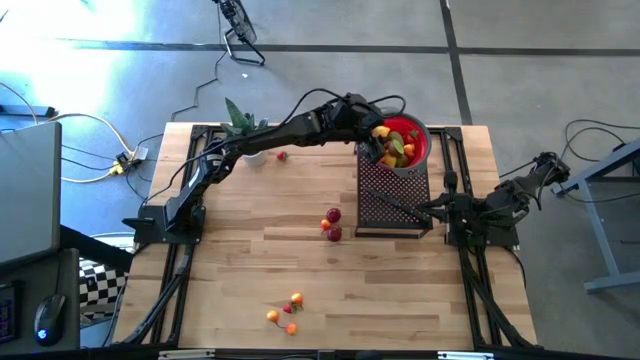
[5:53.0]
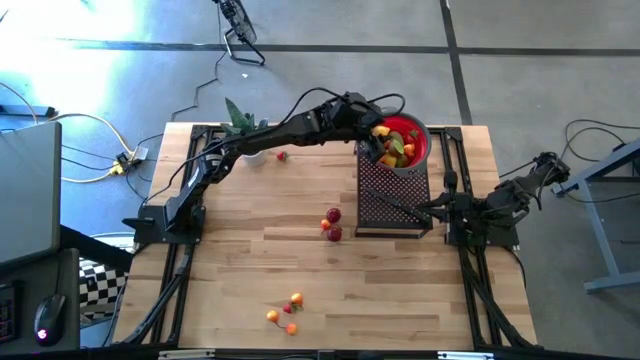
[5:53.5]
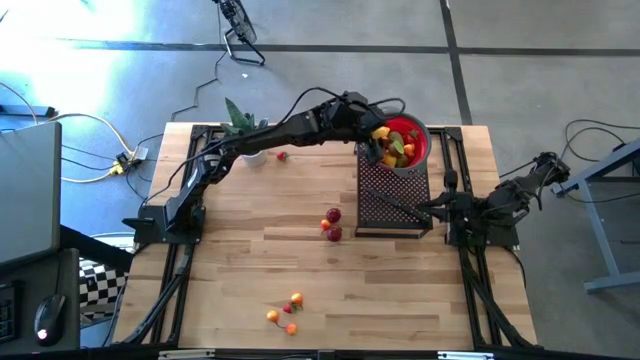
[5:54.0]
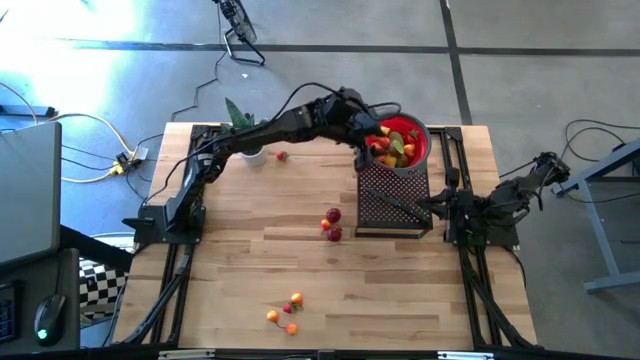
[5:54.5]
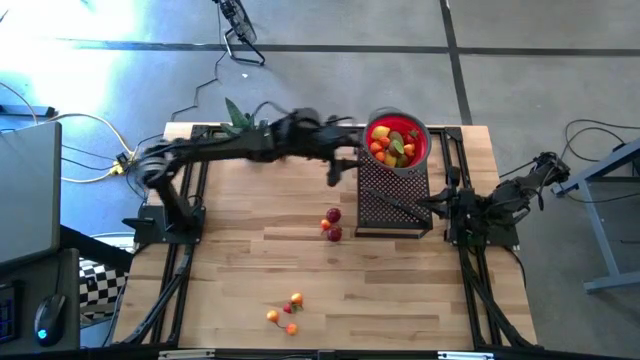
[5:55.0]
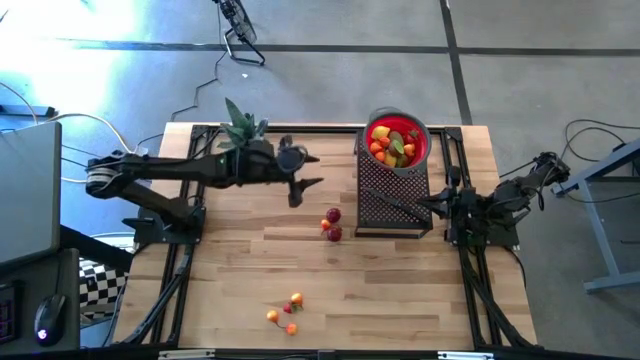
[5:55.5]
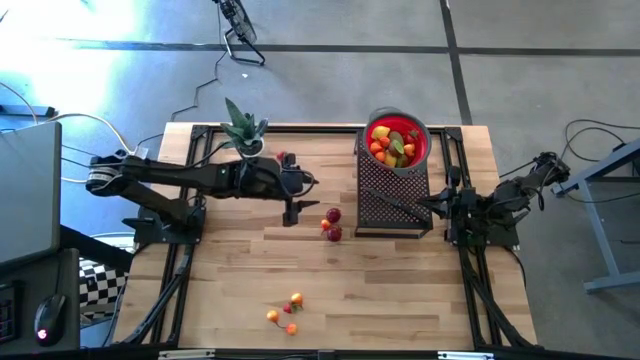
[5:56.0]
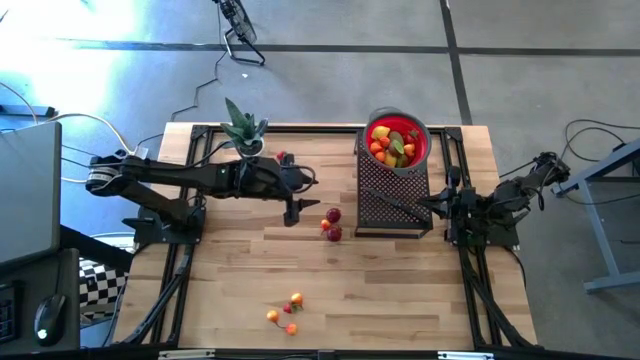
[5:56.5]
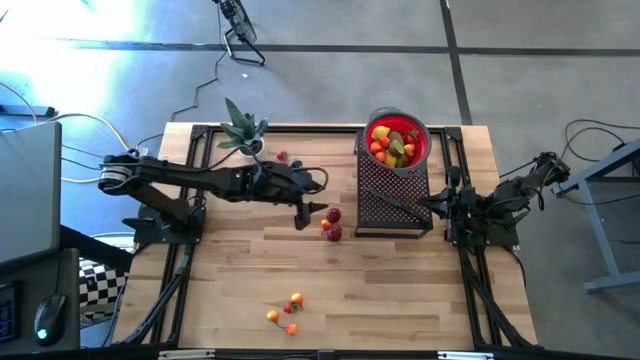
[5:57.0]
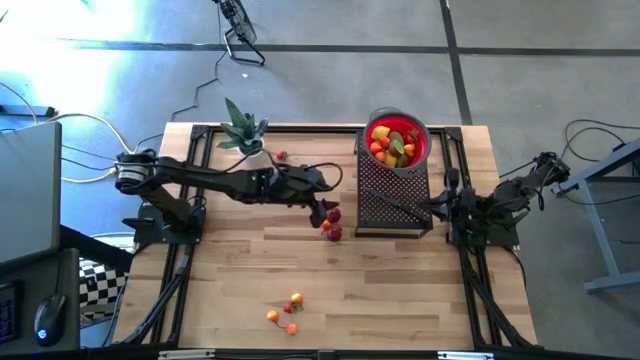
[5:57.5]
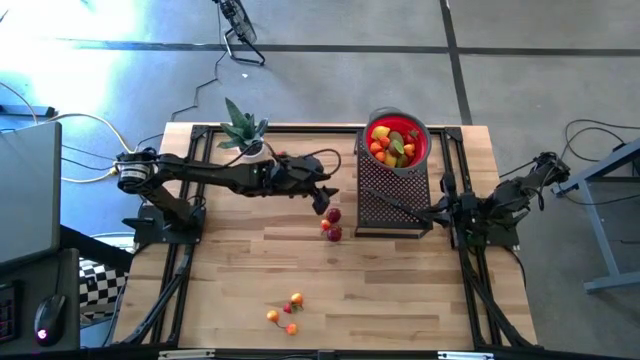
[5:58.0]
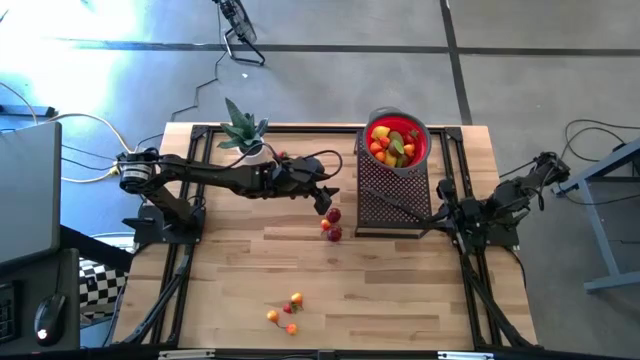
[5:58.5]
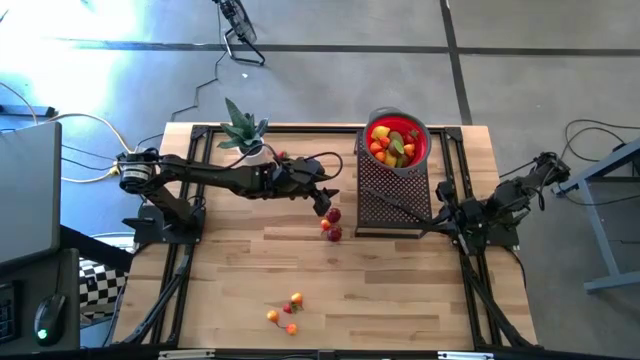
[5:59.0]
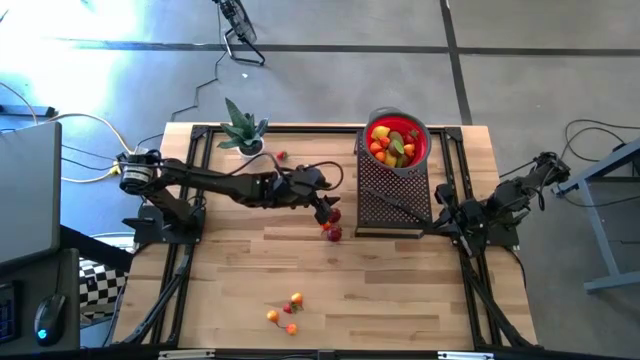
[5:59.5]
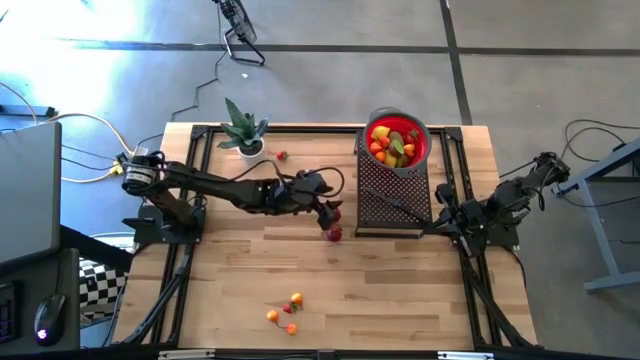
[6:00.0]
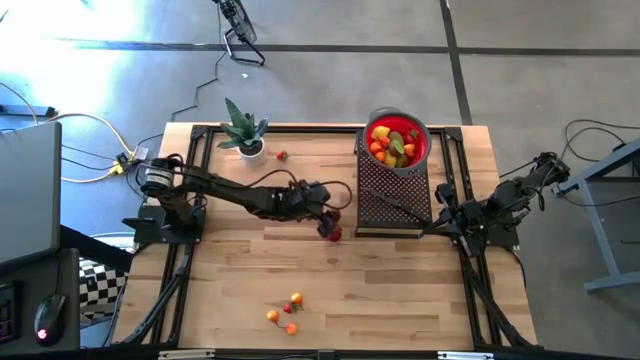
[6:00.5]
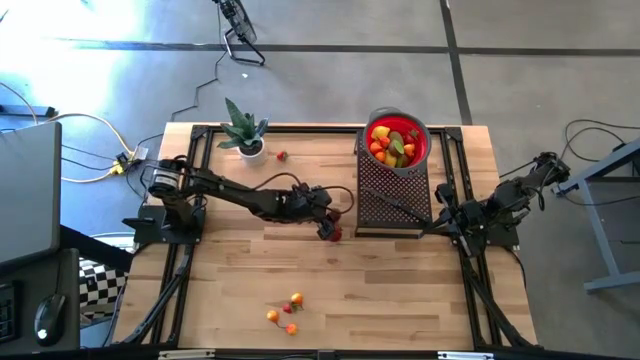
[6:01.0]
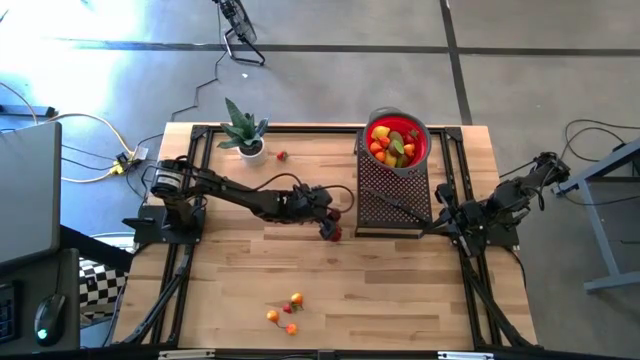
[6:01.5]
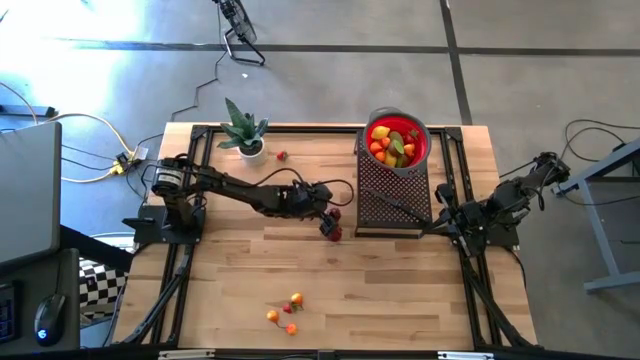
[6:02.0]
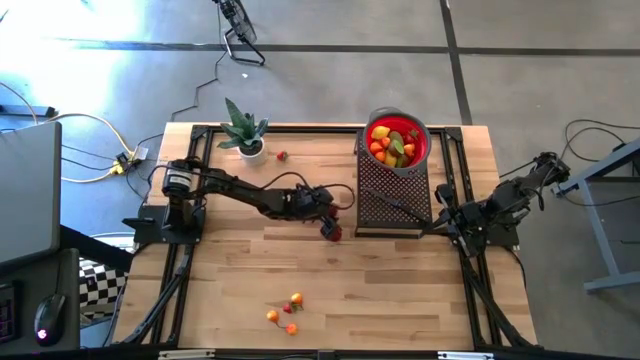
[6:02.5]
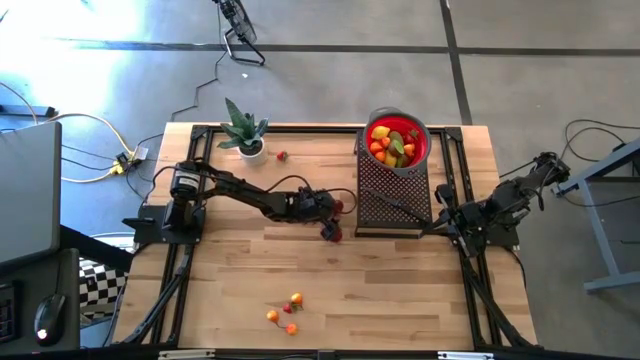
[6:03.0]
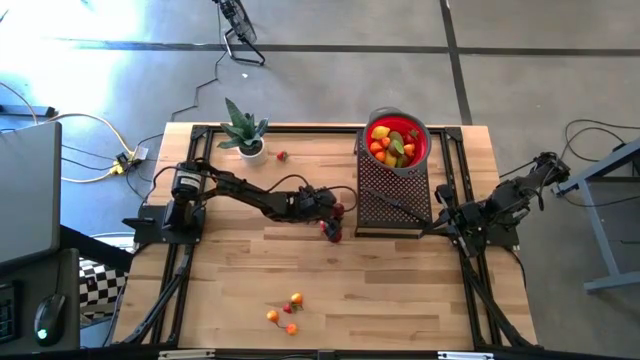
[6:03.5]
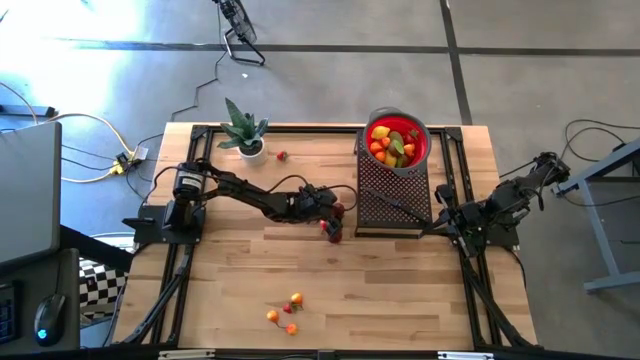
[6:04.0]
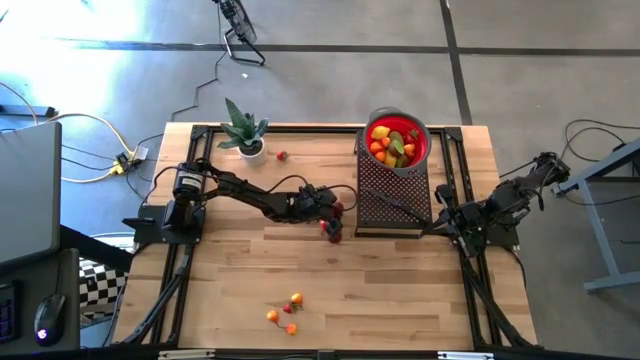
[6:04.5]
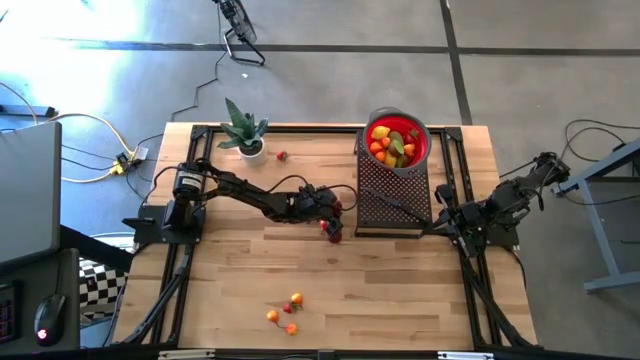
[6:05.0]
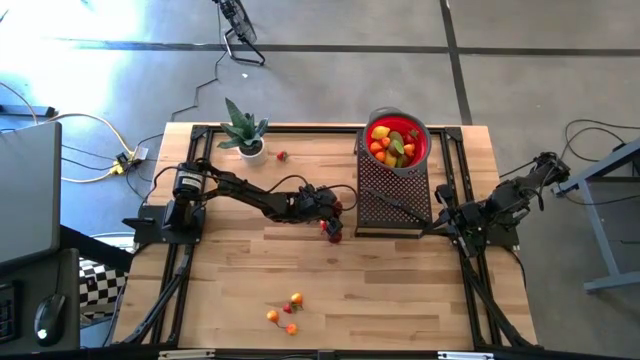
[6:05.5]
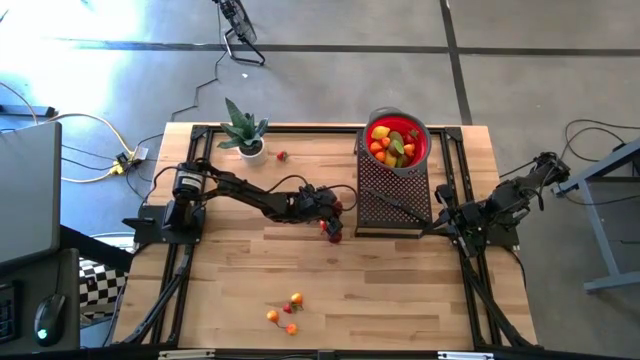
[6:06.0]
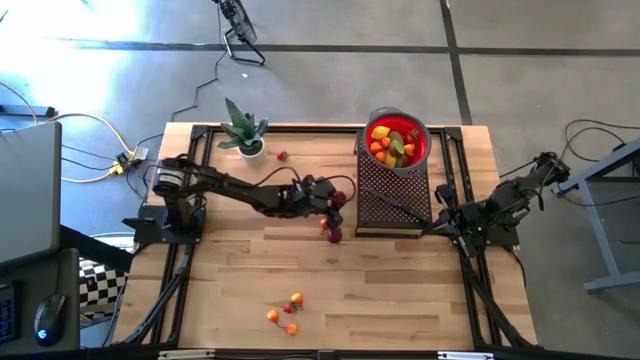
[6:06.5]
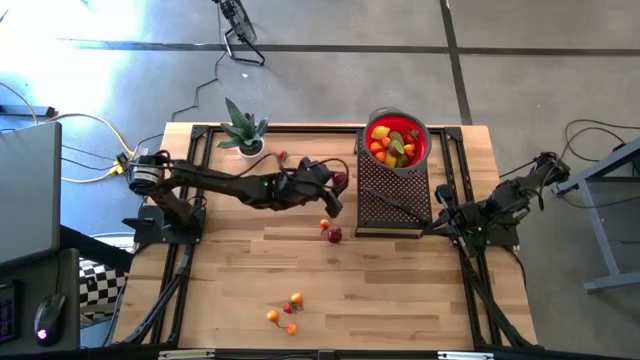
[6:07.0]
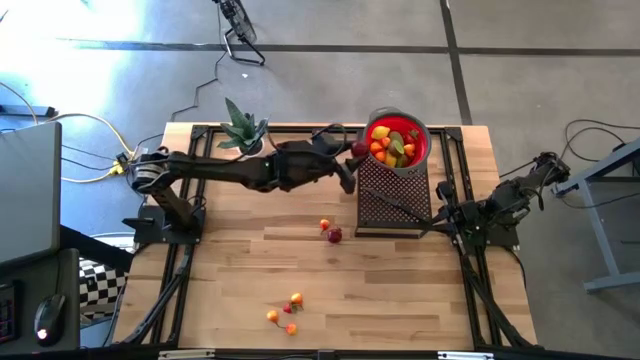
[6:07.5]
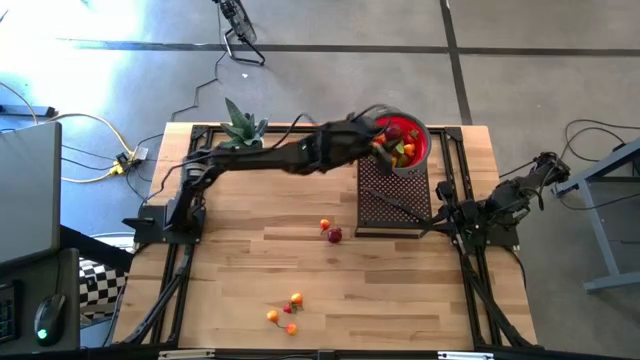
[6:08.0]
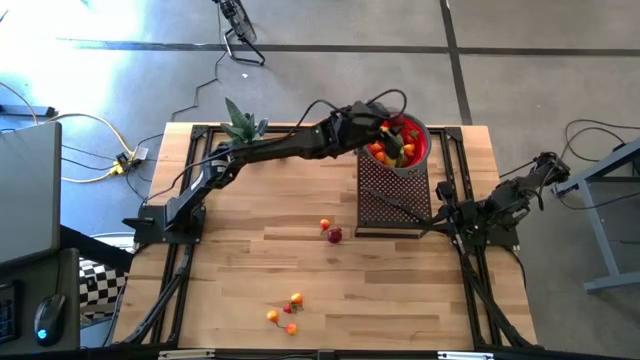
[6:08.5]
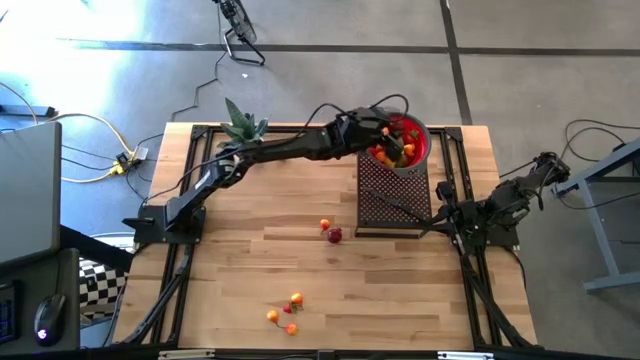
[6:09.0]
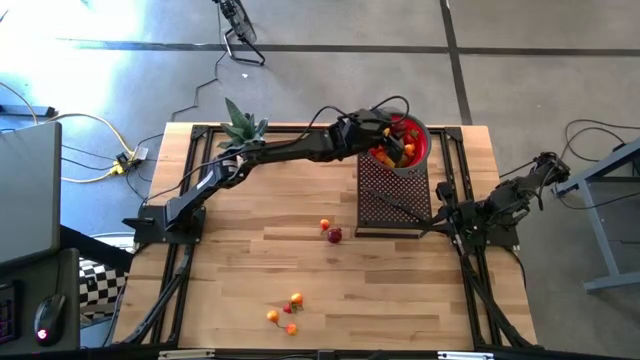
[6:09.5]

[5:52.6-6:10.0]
Task: Pick & Place Fruit
Put the pomegranate into the strainer bowl on the shelf

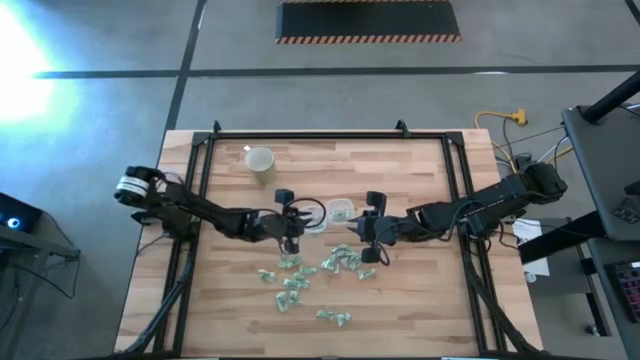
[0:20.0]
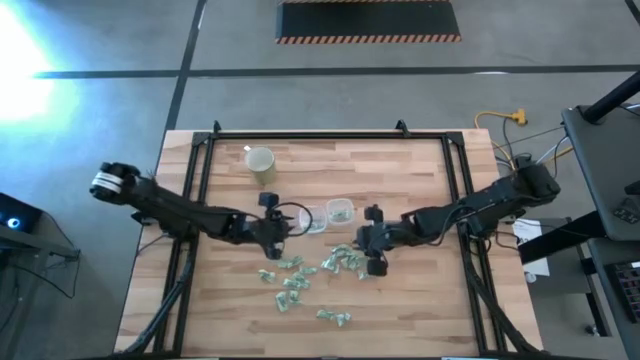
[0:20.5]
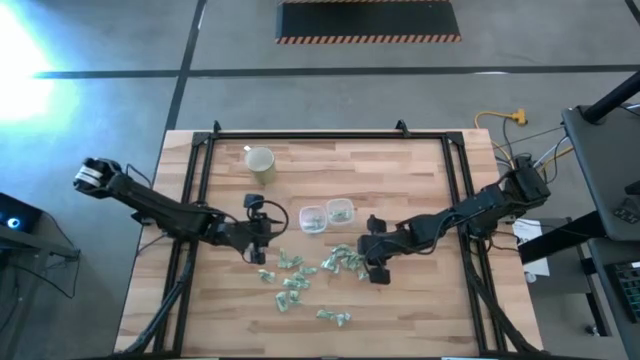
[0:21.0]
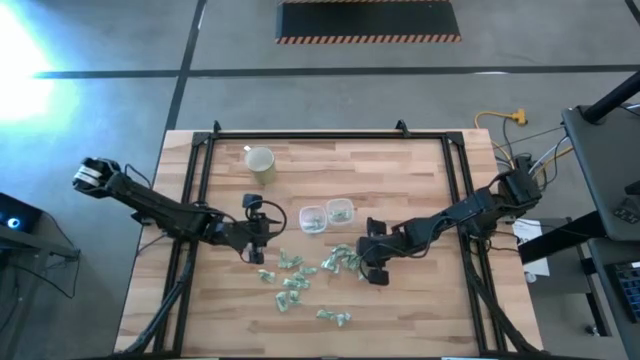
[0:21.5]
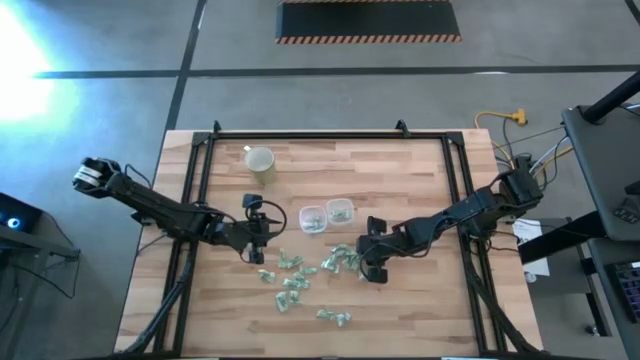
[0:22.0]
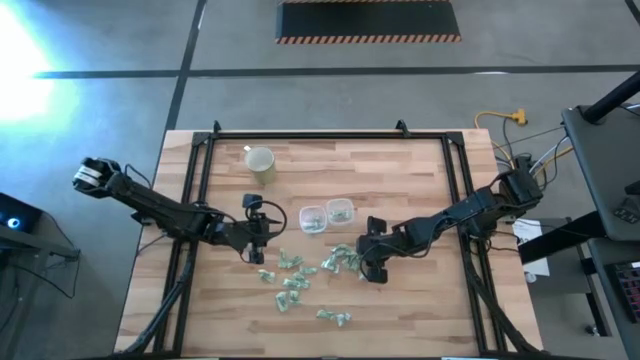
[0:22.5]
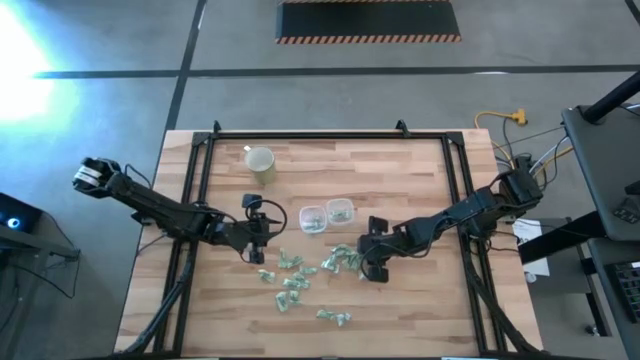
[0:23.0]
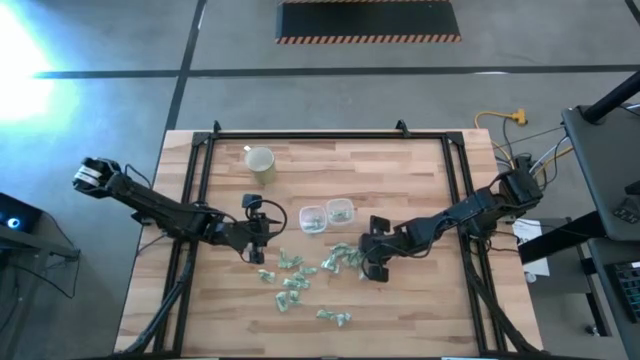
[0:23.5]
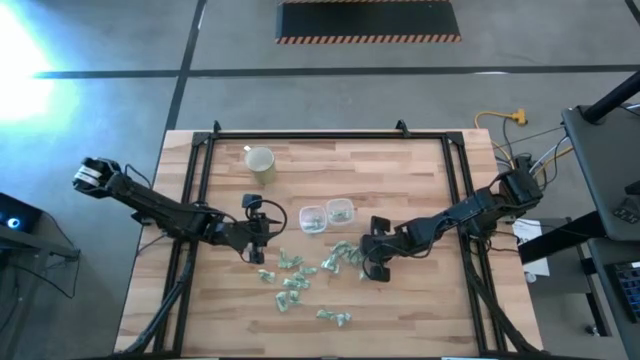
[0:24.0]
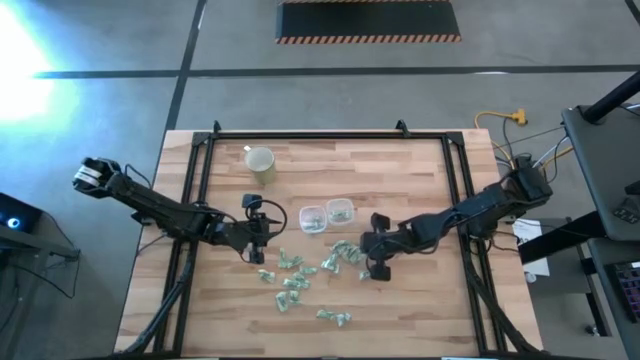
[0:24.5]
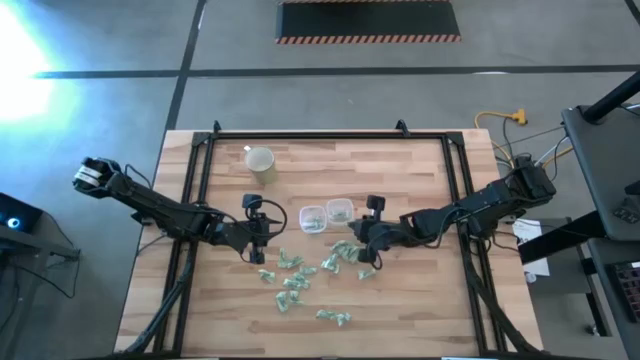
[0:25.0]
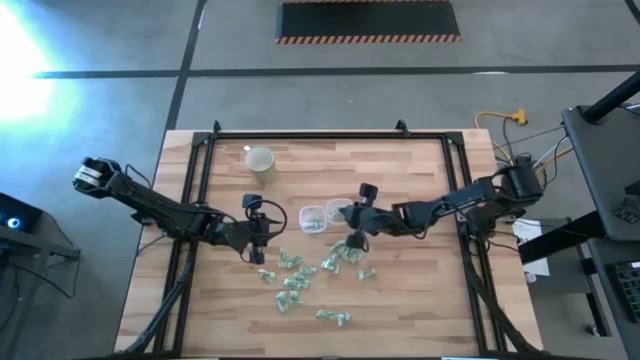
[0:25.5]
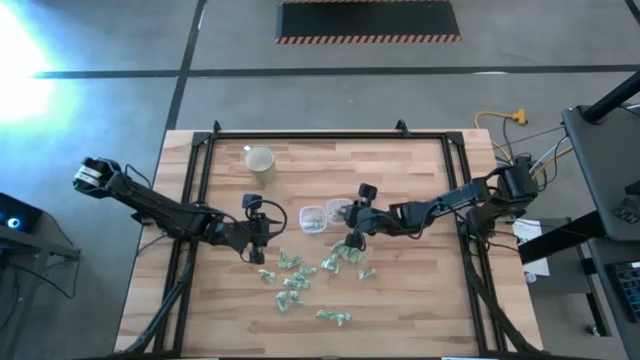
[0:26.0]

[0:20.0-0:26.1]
Task: Pick and place items into bin
Put the stevia packet into the right transparent bin
